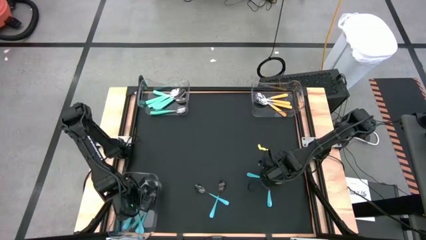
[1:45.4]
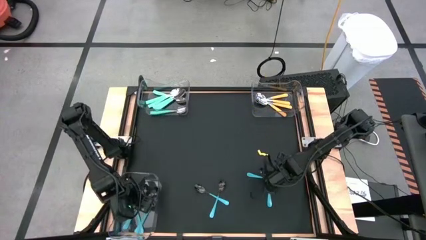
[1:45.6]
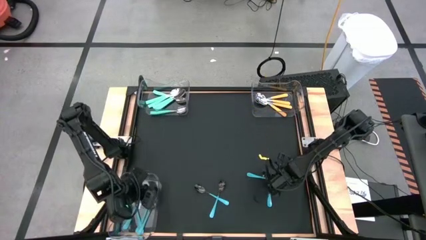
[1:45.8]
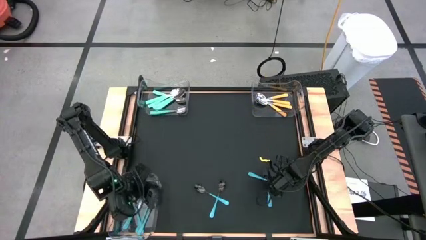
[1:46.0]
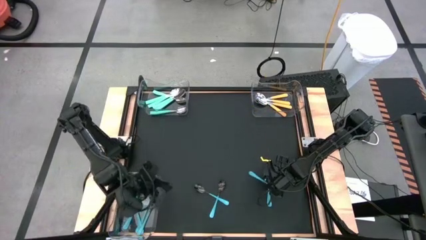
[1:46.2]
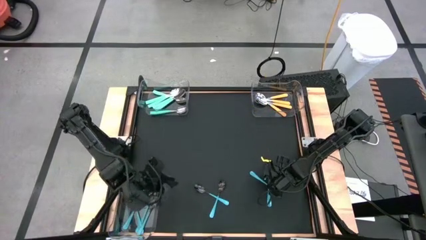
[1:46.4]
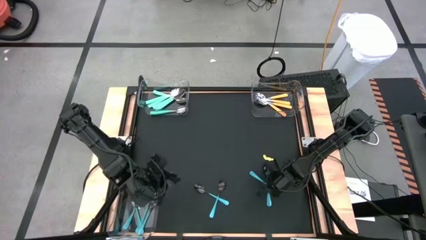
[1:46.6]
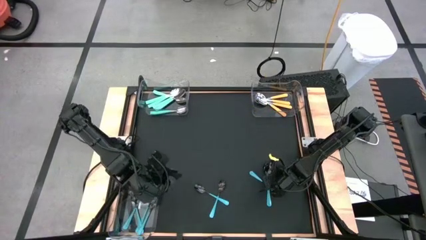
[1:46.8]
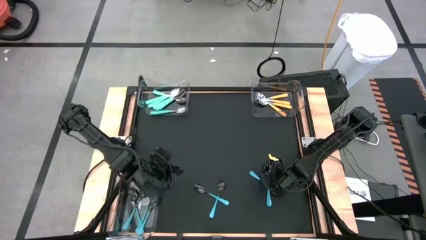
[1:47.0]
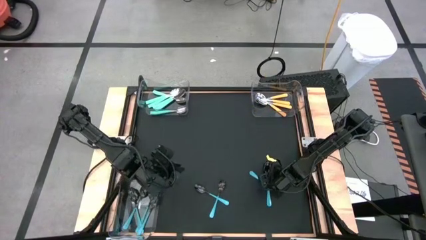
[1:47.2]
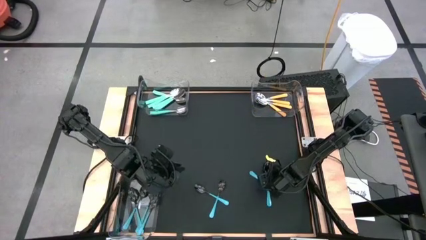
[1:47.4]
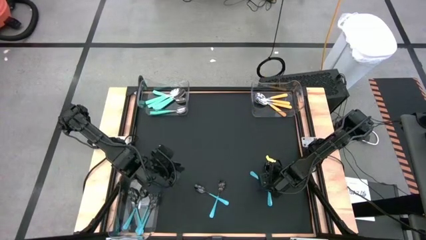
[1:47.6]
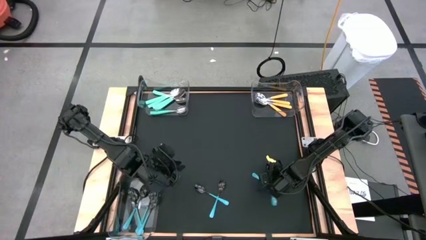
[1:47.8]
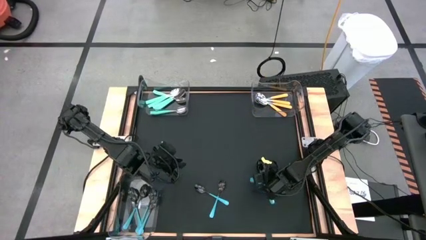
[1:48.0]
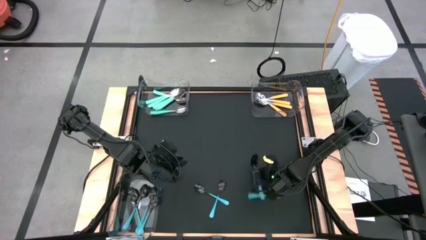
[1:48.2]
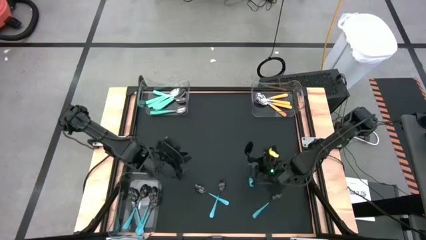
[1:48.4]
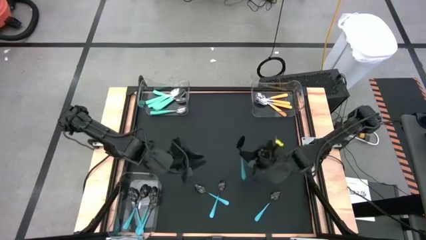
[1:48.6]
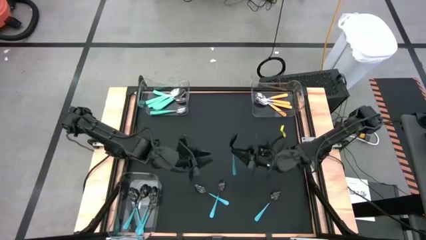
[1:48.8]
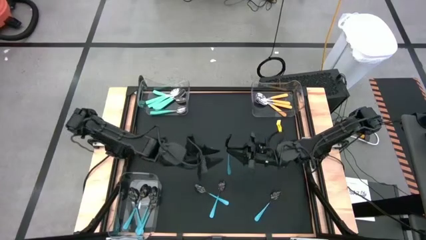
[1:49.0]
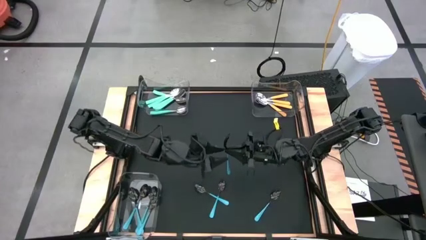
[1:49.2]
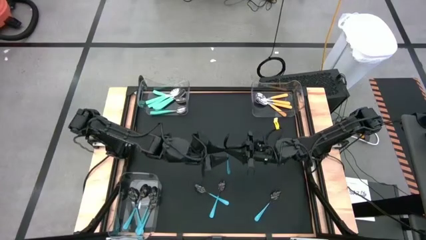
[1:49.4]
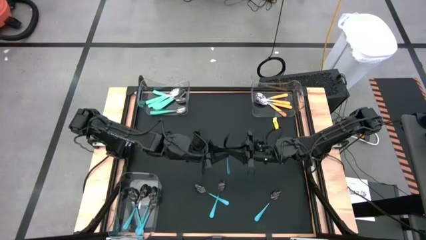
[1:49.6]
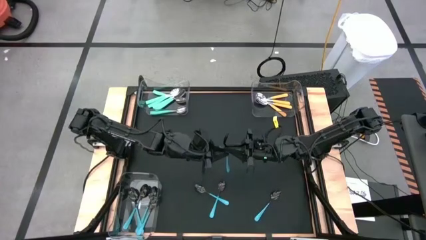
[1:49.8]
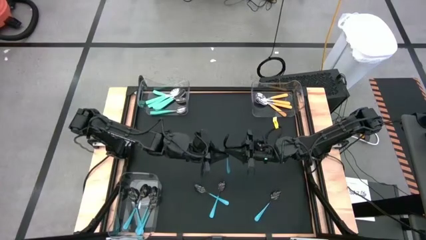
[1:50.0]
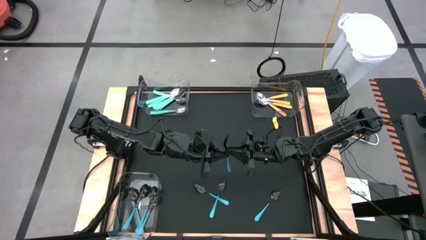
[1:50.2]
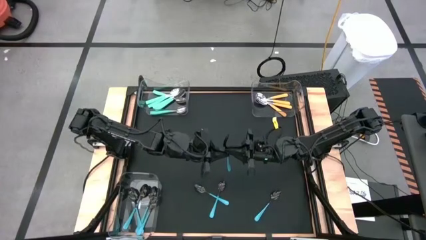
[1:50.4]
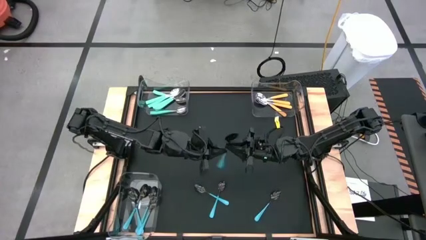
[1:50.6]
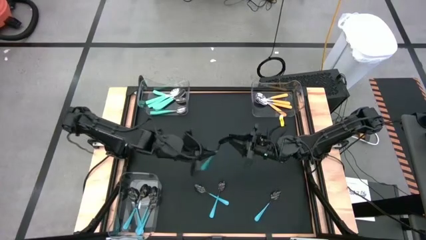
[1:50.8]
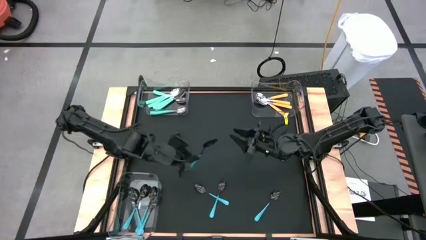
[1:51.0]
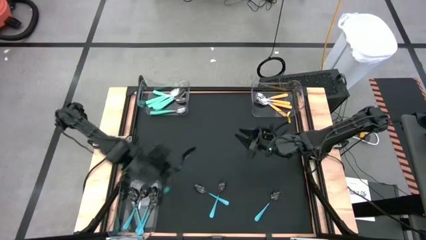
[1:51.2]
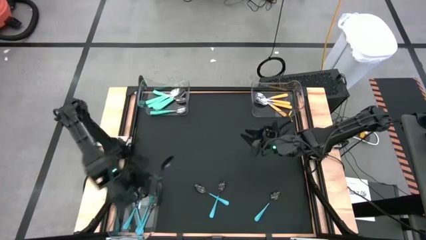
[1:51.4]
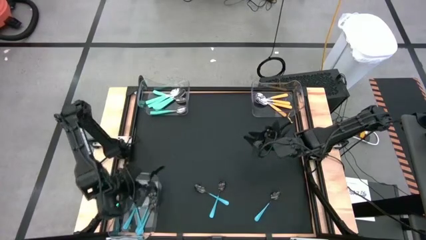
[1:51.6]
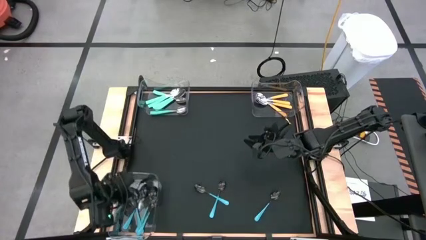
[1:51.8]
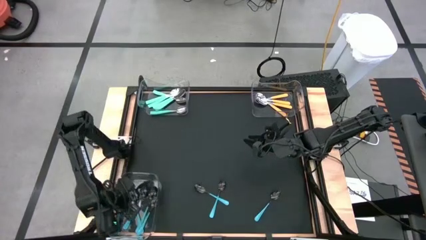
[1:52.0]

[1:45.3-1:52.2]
Task: Sort silverware by color (type)
Put the blue spoon into the bottom transparent bin

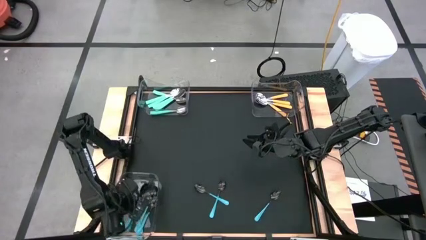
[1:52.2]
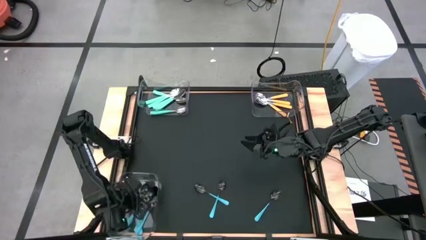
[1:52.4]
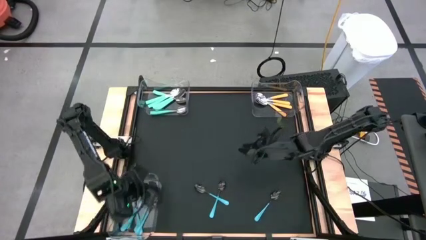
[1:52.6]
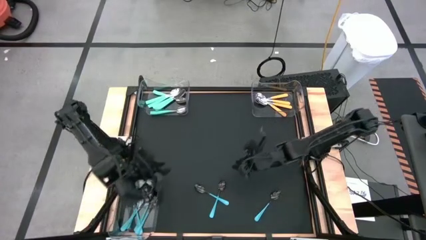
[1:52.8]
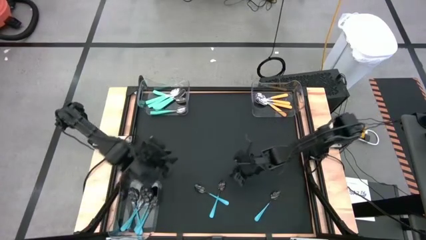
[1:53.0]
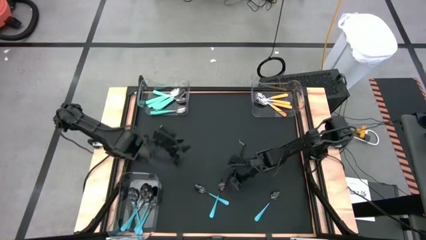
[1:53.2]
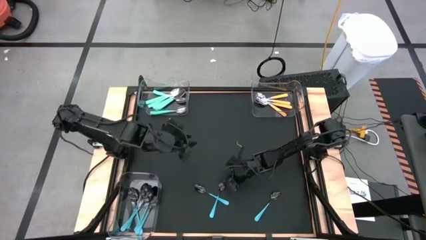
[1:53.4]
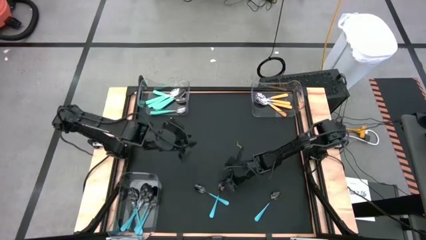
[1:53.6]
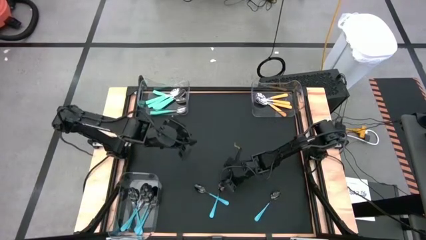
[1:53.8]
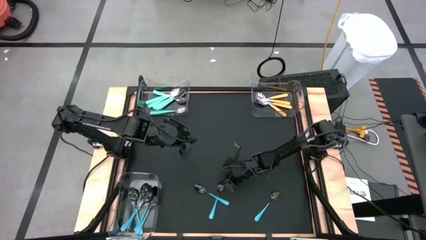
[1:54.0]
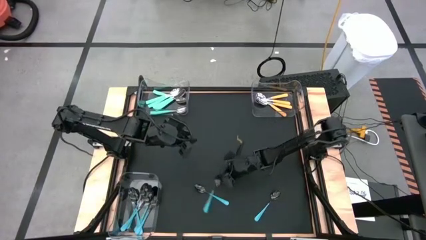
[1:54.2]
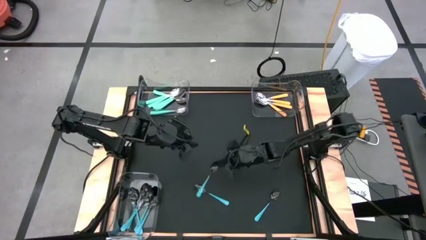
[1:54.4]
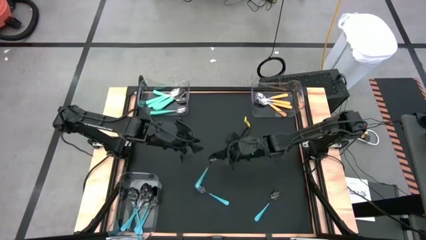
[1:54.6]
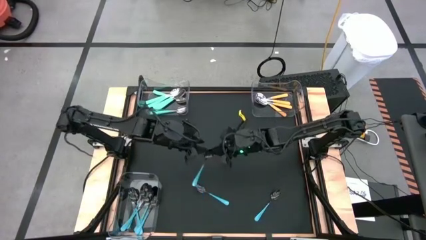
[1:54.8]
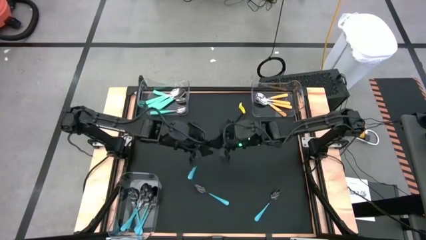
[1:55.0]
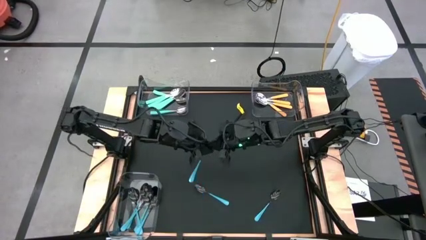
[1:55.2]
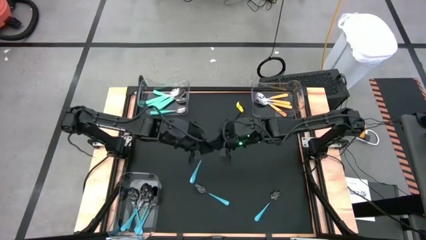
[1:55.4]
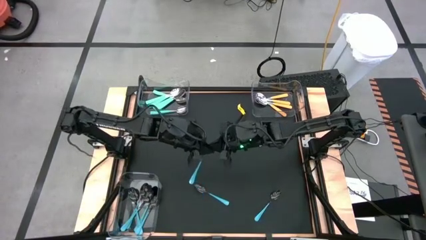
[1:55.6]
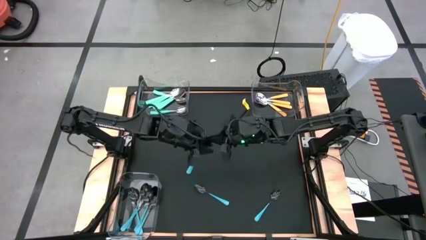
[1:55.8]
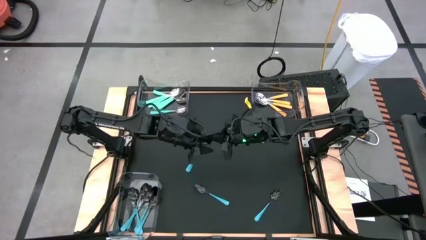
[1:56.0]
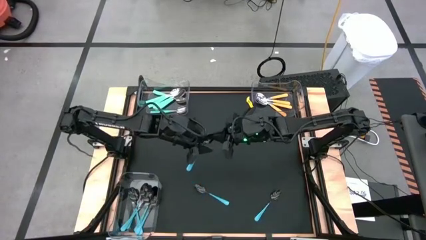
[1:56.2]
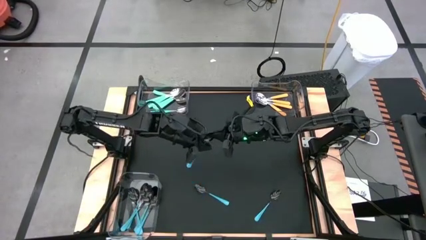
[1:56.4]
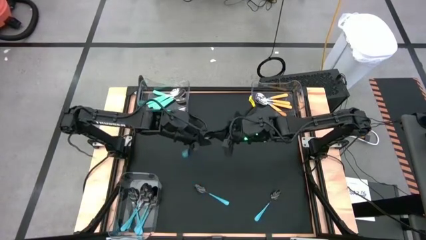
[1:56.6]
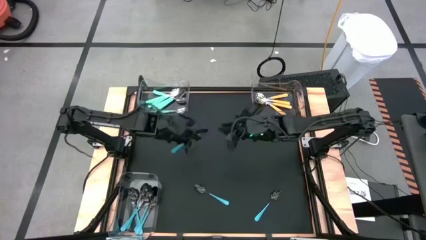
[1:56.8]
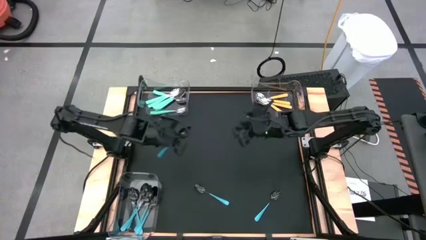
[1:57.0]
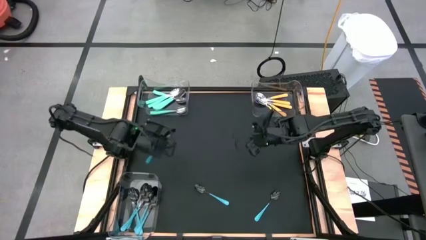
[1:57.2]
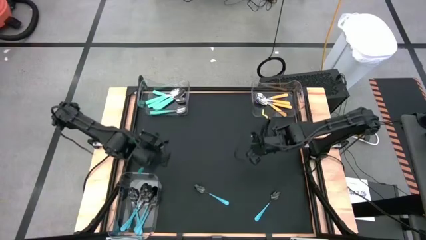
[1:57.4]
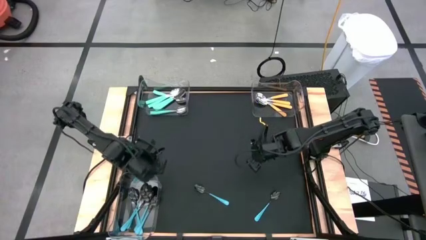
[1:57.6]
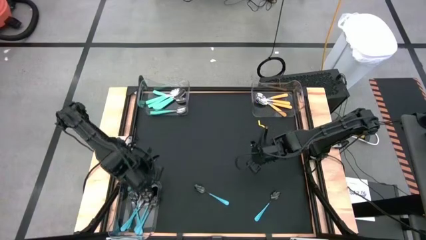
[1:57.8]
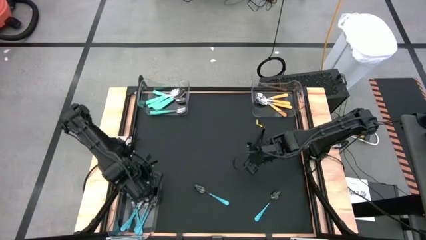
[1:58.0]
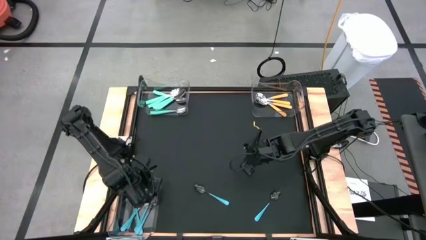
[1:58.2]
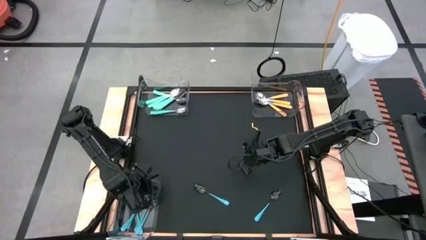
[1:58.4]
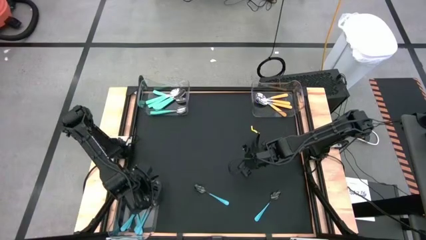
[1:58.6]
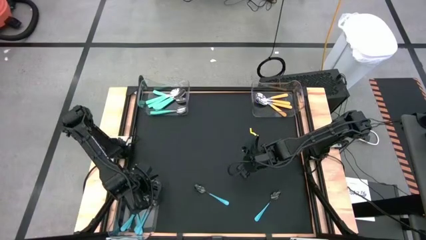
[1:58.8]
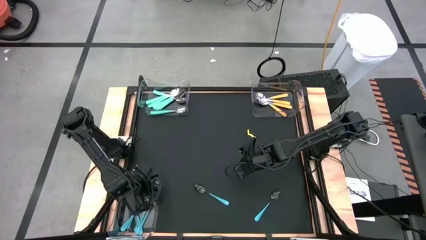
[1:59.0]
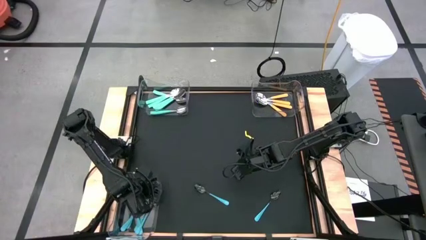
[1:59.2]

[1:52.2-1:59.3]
Put the blue spoon into the bottom transparent bin

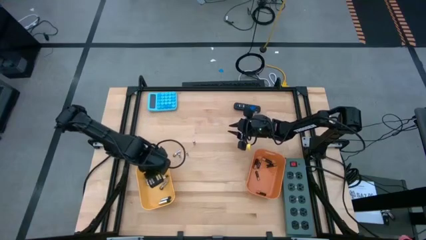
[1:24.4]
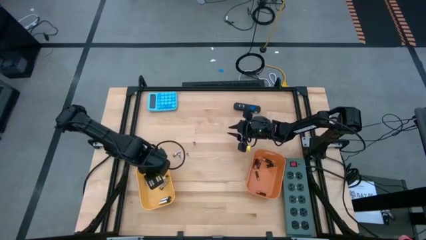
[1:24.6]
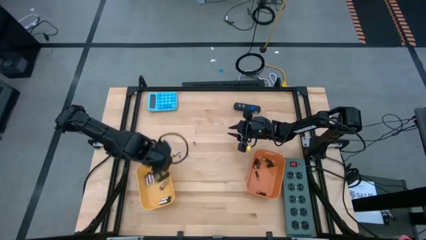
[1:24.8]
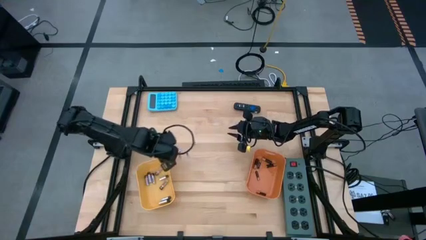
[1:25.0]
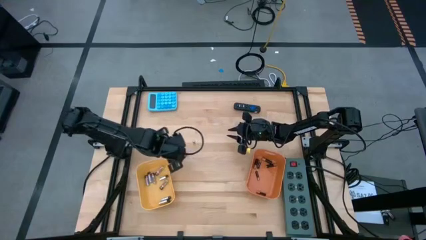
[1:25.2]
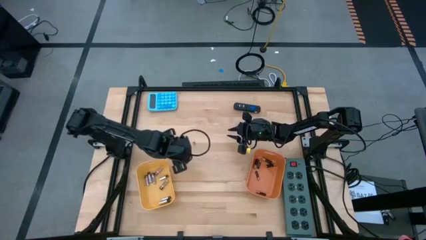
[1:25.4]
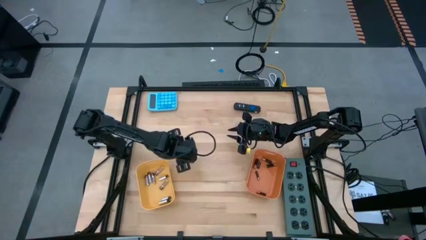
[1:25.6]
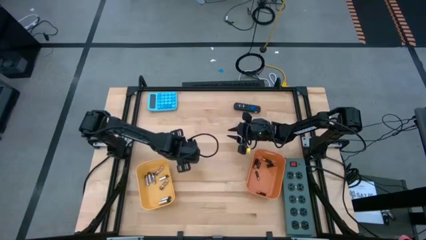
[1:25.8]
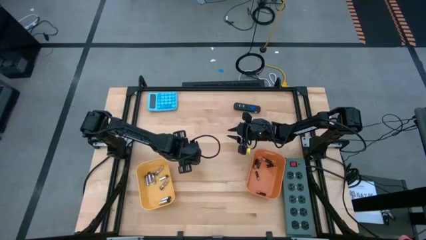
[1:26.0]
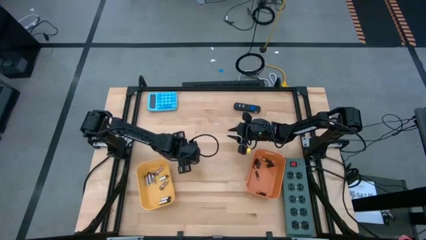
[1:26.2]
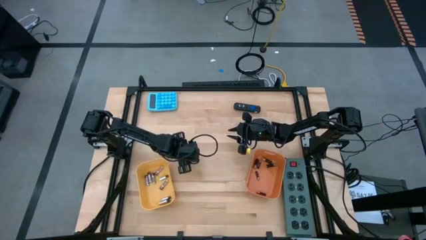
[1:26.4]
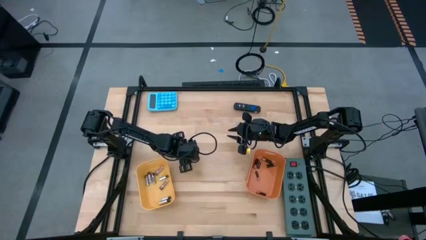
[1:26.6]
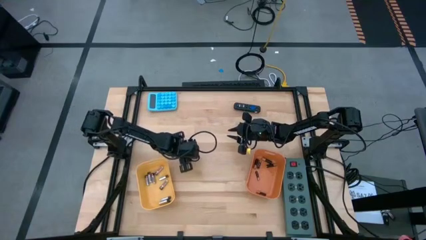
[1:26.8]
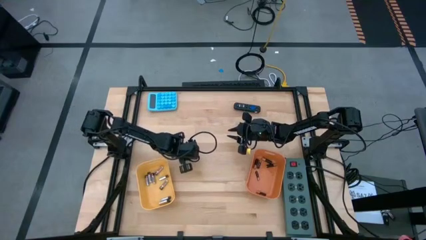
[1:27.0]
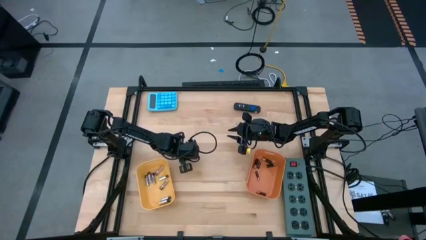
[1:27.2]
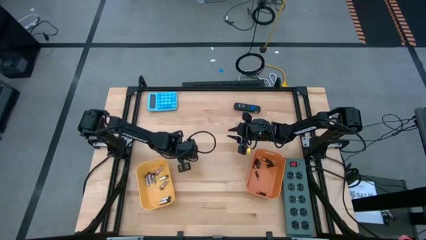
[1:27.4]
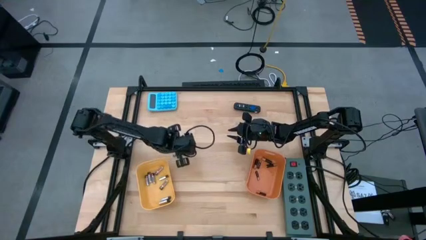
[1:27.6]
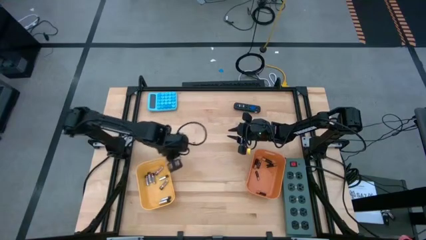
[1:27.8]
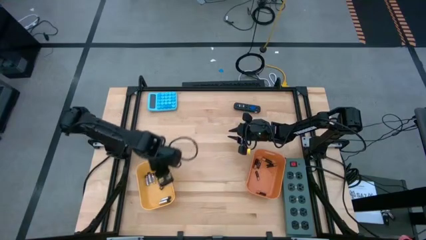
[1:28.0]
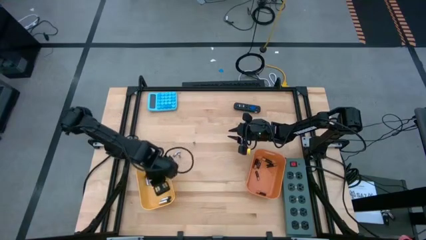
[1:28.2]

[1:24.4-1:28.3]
Task: Sort batteries
Put the silver battery into the yellow bin
